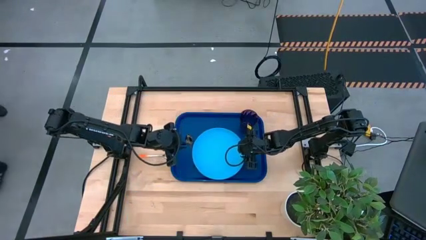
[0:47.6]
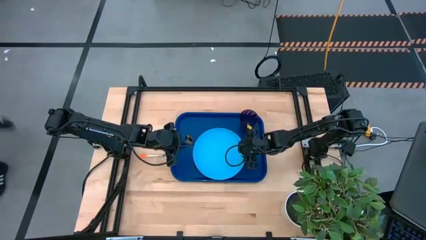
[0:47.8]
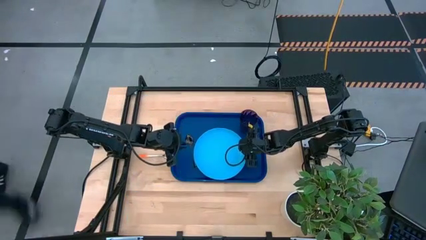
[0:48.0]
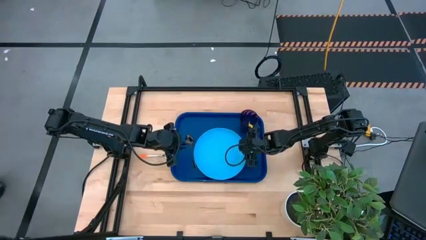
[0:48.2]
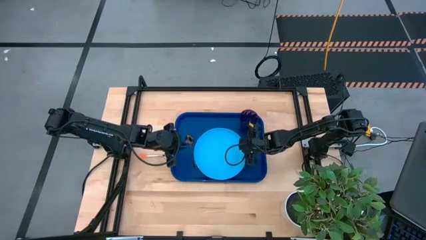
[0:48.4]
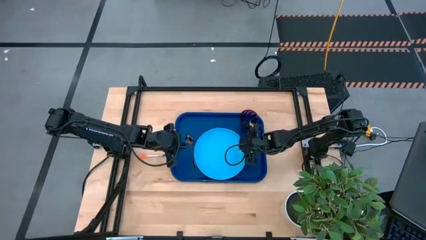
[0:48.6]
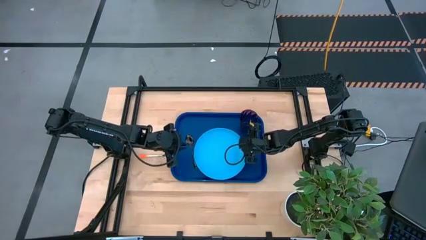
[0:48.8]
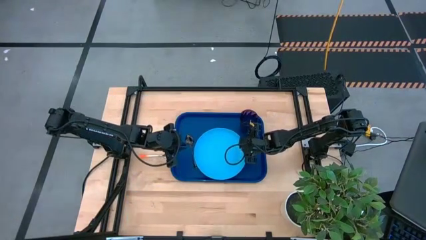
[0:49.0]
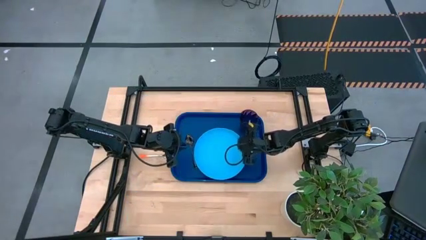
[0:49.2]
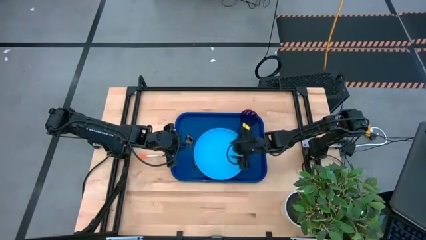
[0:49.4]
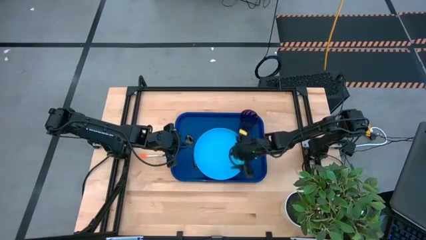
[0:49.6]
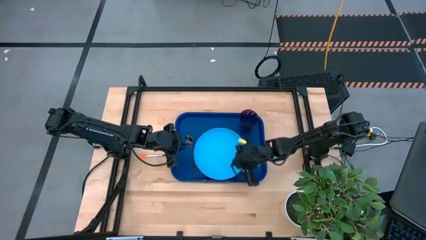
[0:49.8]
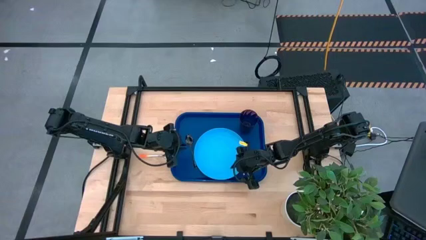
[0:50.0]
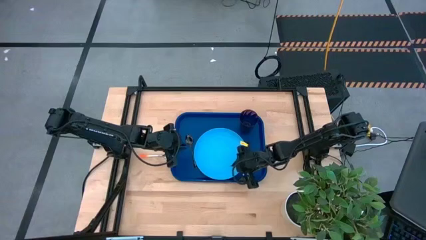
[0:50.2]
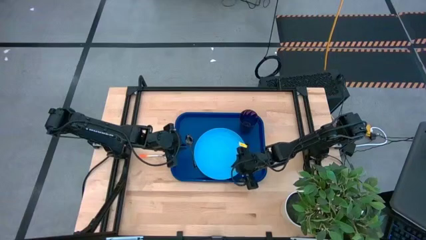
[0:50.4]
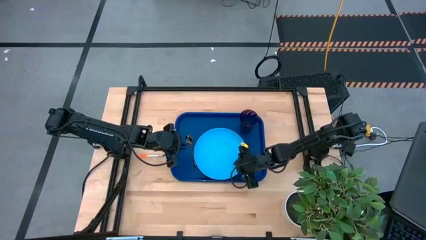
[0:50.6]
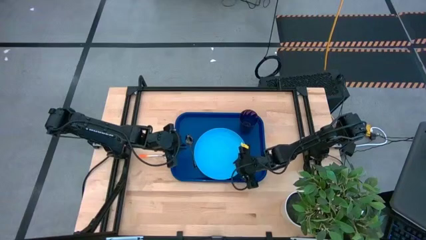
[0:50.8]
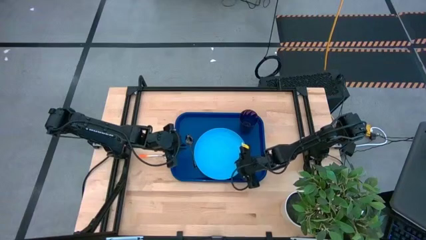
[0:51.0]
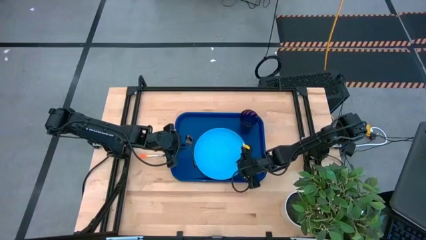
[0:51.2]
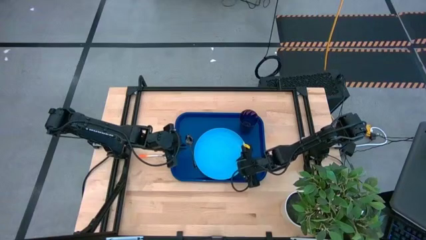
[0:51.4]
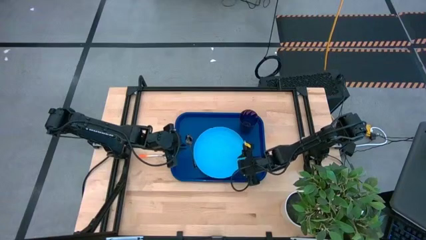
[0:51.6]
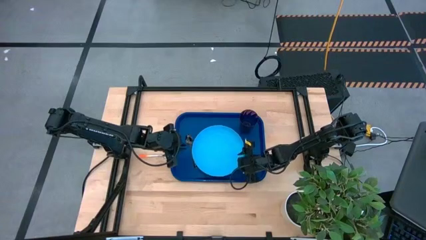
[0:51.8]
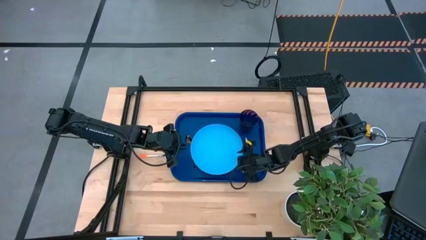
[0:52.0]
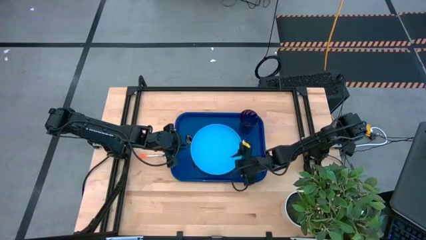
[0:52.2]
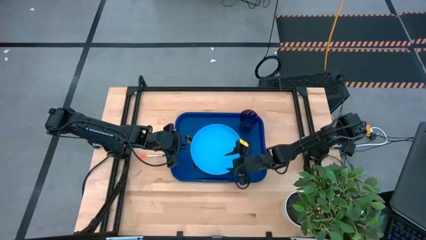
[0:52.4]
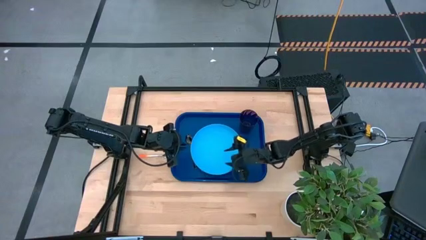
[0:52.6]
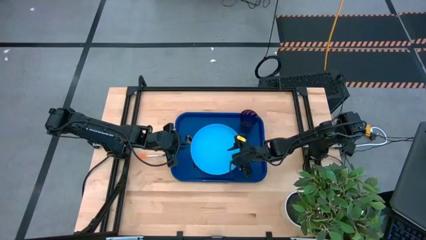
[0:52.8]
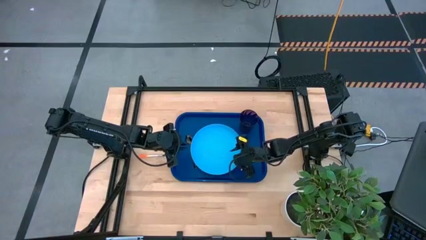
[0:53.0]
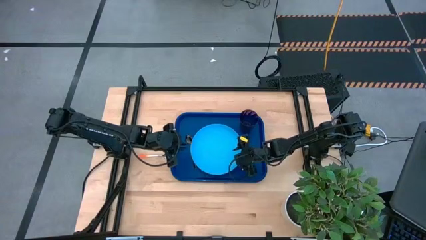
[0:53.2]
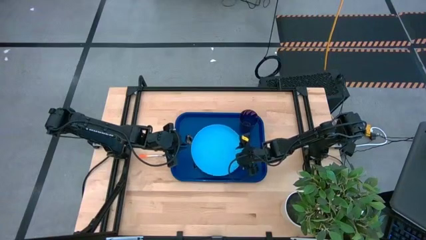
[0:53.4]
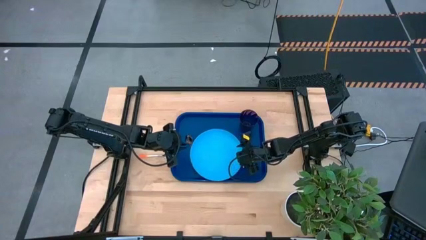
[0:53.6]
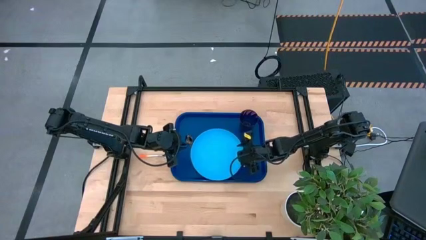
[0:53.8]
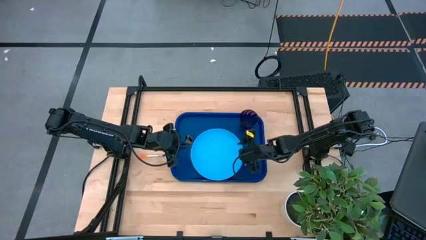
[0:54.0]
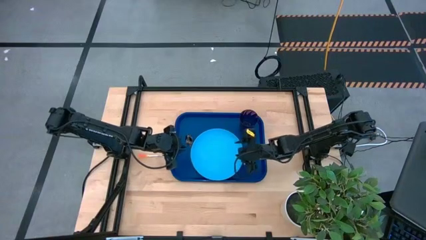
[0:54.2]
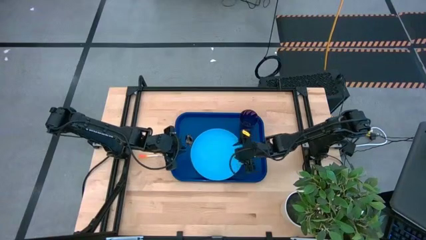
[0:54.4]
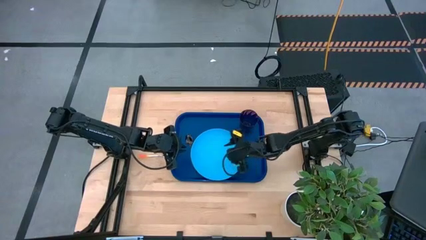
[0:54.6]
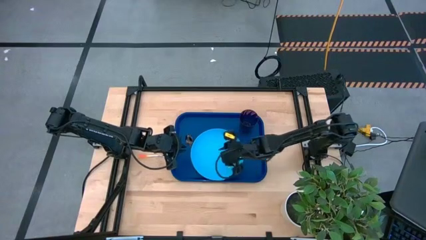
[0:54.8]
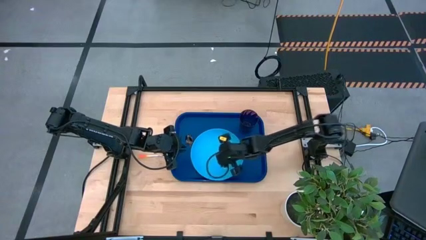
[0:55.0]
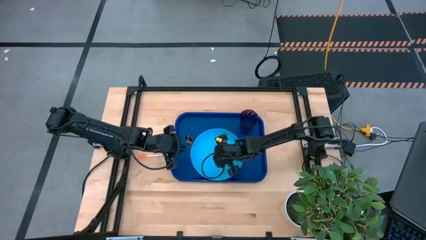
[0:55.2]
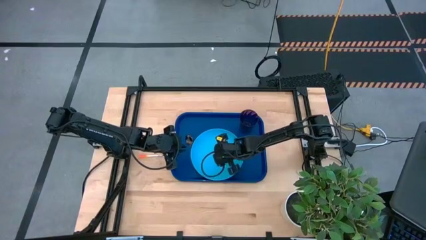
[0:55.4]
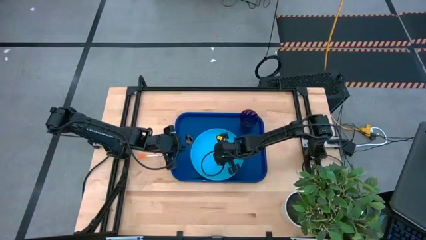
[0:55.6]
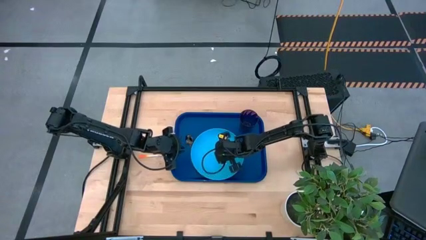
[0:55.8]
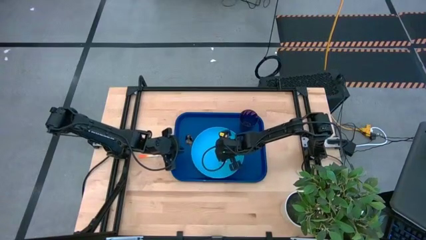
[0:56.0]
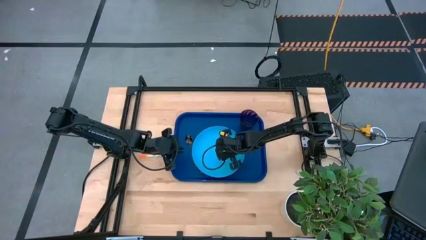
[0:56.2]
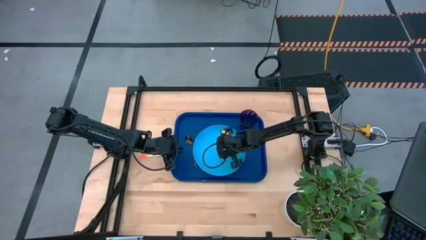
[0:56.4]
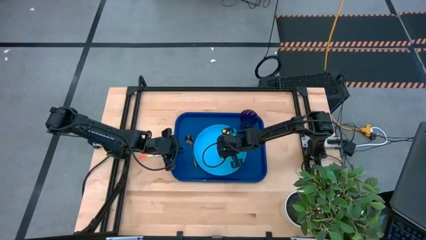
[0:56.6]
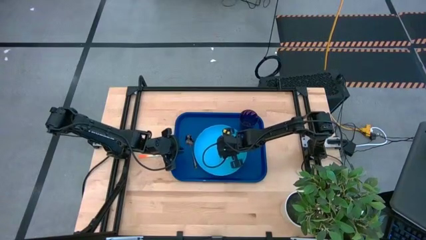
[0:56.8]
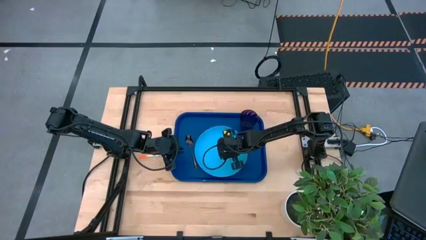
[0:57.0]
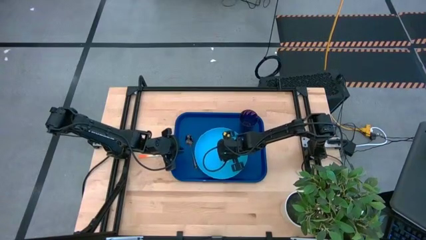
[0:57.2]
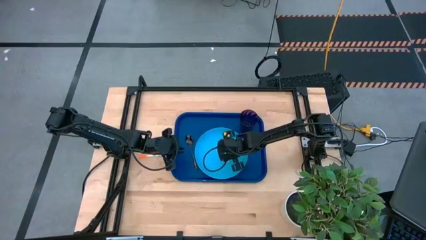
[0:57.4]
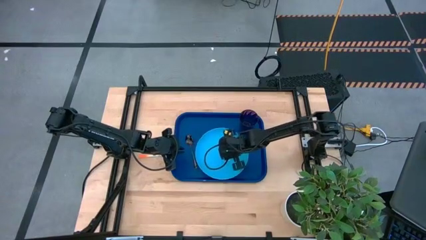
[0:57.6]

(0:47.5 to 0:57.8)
Task: Pick and place plate/cup/fork/spoon on tray
Put the light blue plate on the blue serving tray to the bottom left of the violet glass

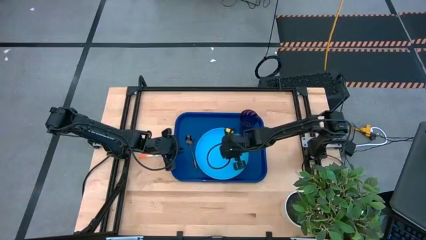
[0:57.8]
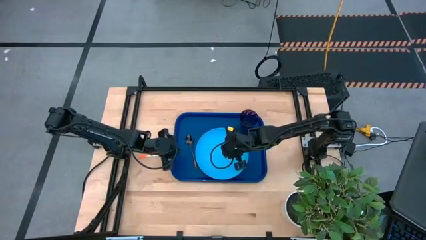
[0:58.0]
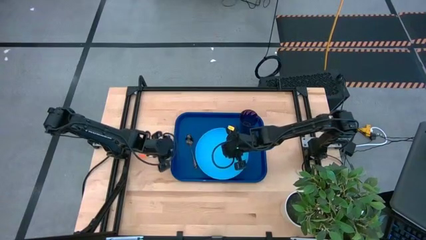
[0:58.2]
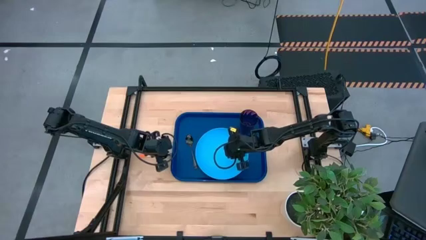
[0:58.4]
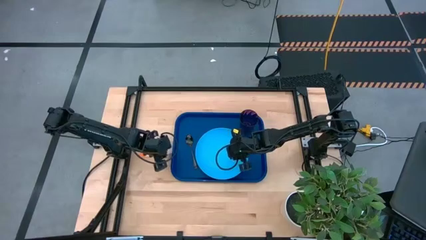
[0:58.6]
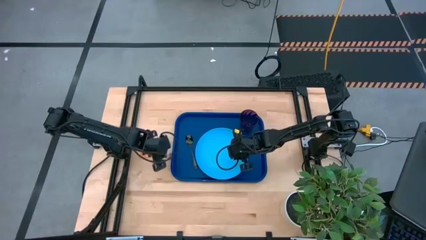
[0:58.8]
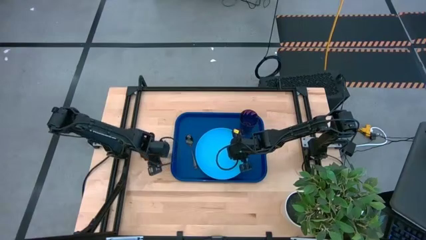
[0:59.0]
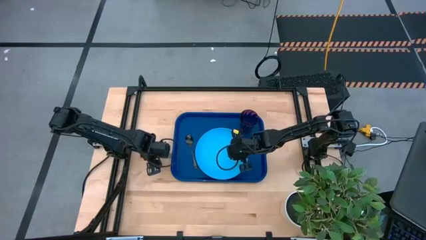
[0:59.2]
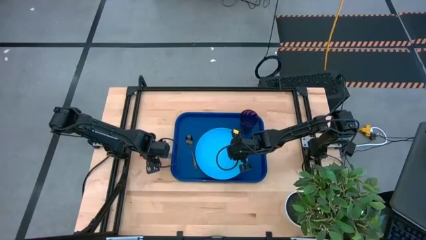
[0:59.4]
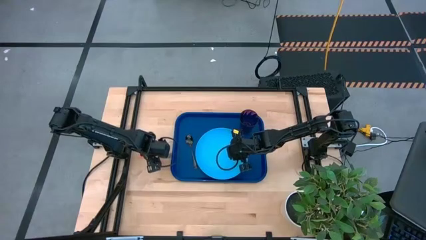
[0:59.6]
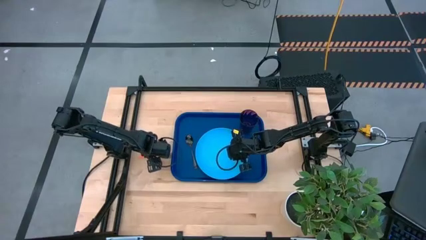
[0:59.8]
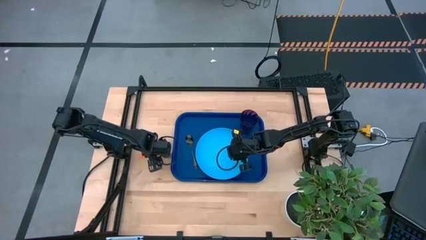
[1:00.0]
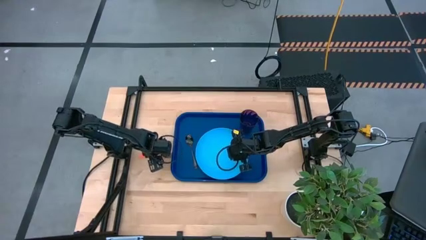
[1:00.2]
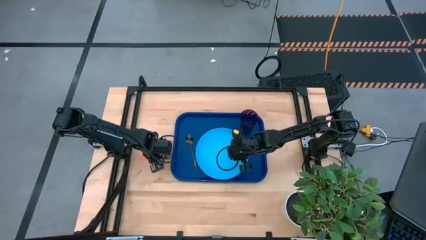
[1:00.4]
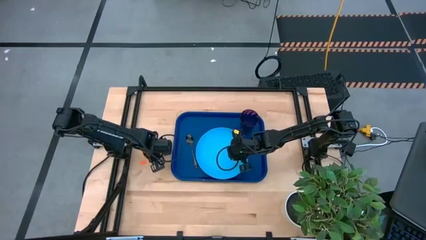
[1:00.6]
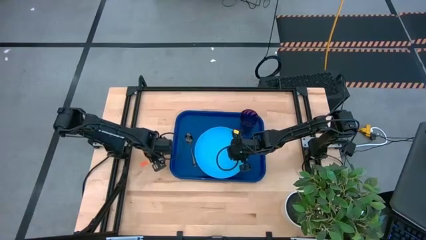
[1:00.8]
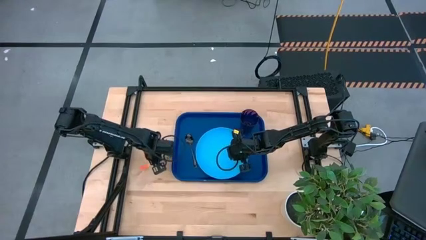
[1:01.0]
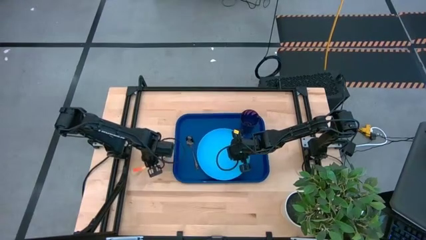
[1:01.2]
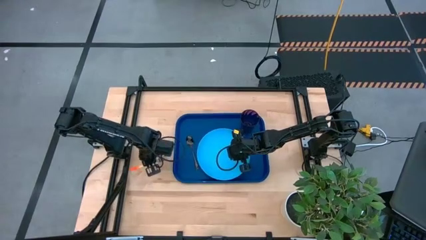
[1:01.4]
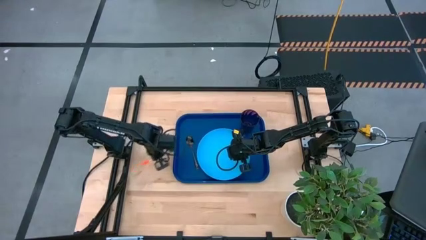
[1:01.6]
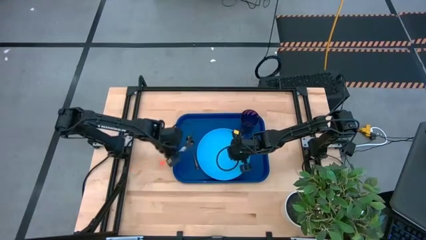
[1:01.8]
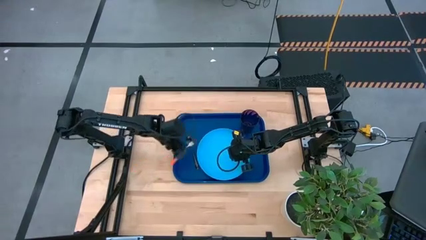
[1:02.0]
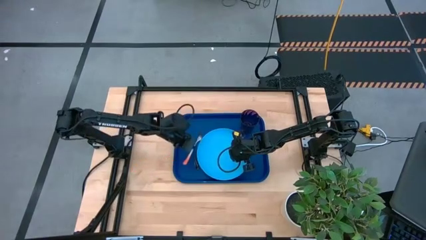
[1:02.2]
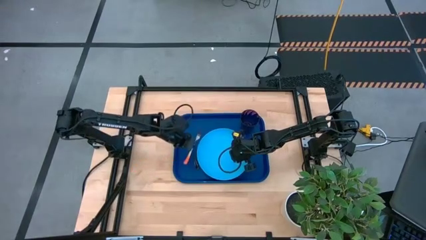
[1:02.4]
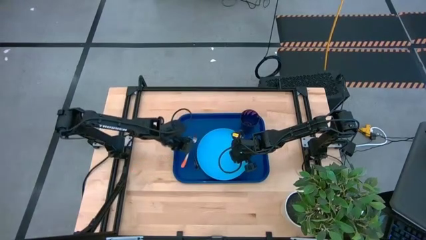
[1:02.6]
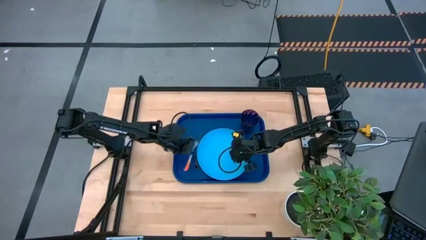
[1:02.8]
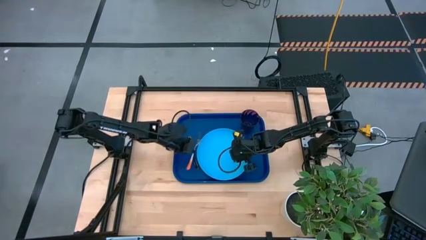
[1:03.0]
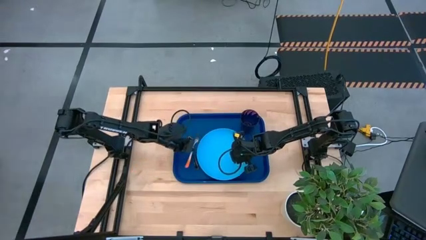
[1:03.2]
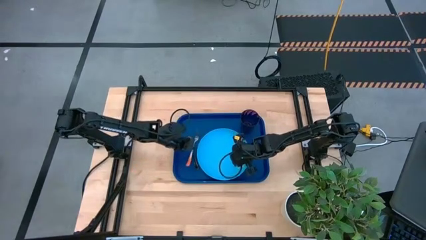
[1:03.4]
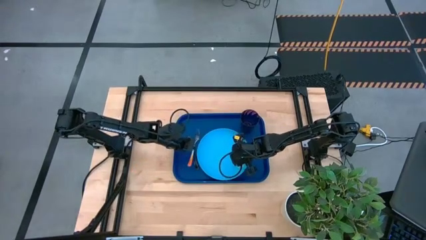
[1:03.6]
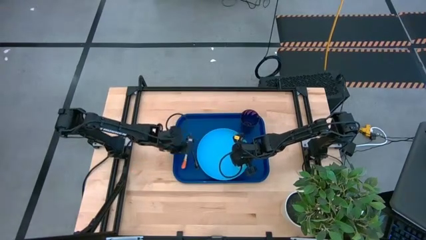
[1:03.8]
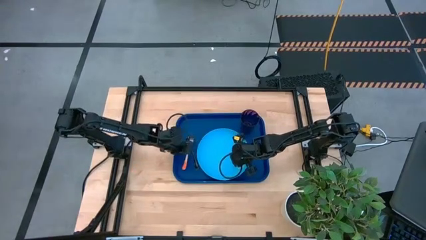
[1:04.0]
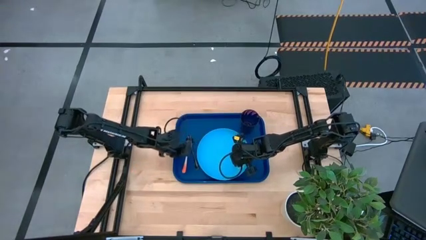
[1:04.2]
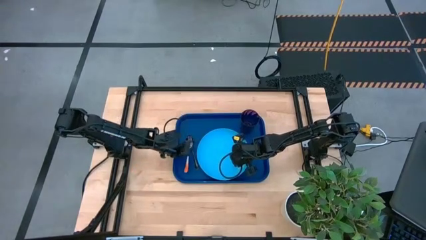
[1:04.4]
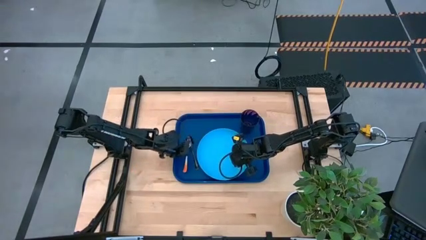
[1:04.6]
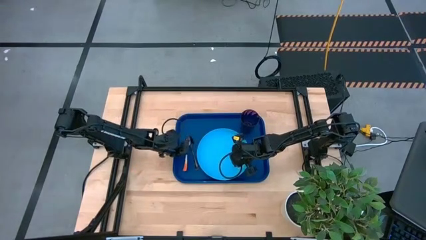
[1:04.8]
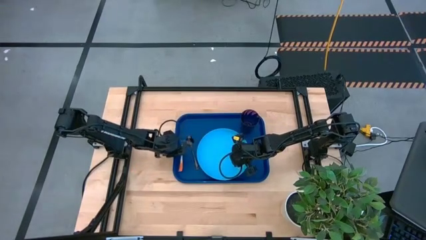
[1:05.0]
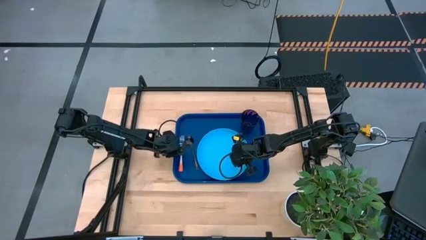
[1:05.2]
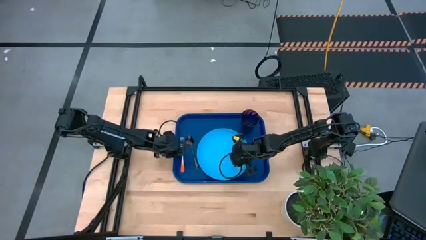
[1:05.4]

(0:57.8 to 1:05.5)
Put the orange fork on the blue serving tray to the left of the black spoon
